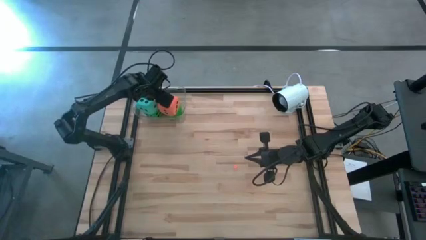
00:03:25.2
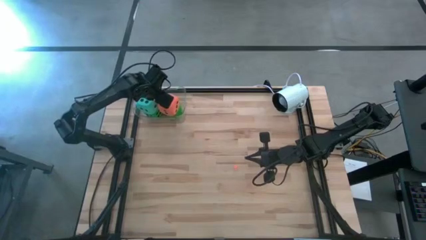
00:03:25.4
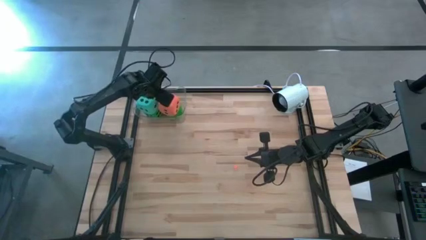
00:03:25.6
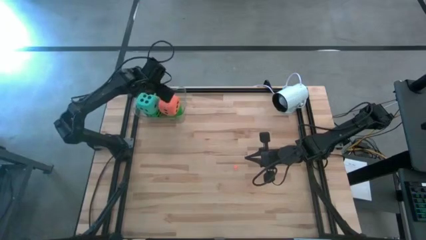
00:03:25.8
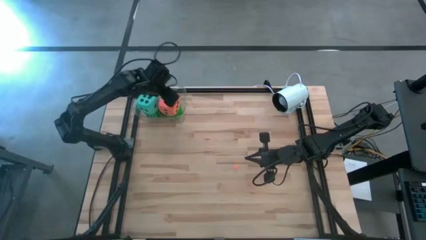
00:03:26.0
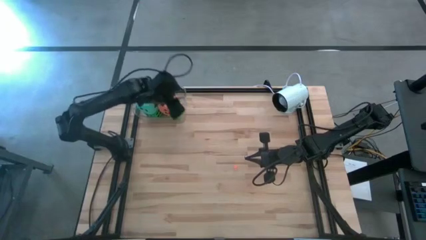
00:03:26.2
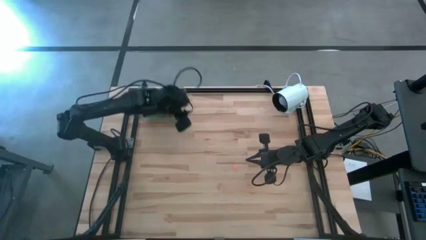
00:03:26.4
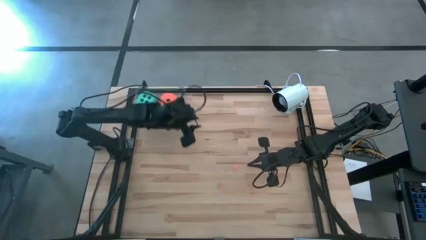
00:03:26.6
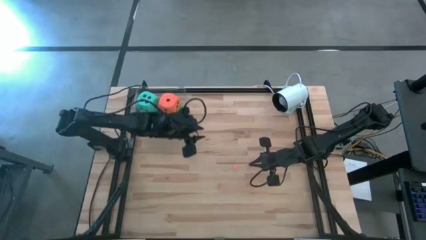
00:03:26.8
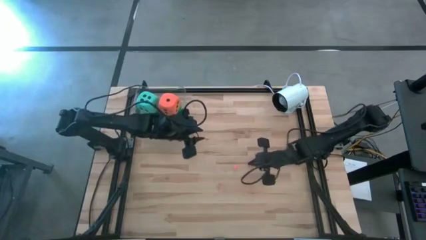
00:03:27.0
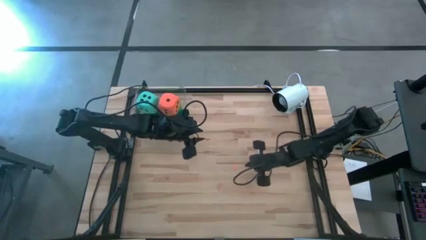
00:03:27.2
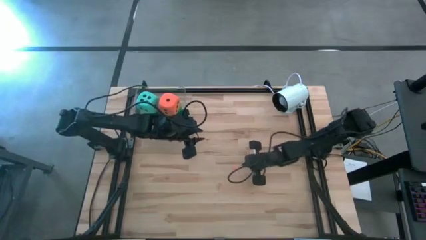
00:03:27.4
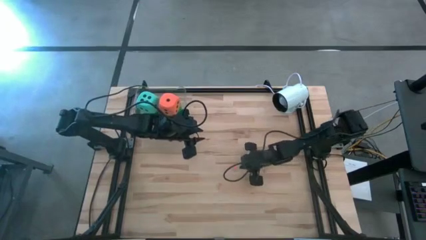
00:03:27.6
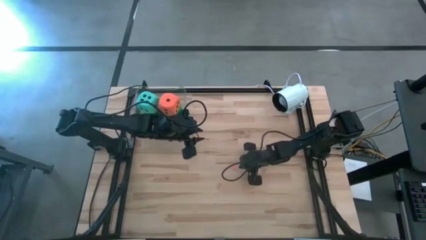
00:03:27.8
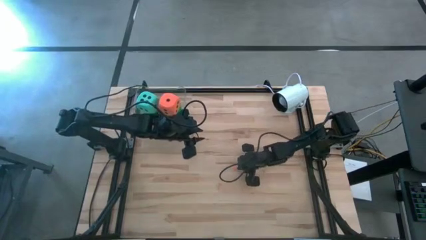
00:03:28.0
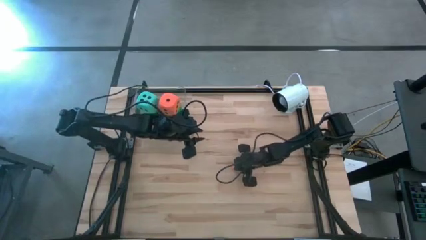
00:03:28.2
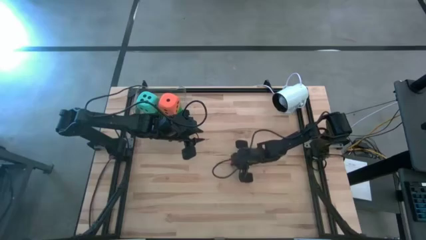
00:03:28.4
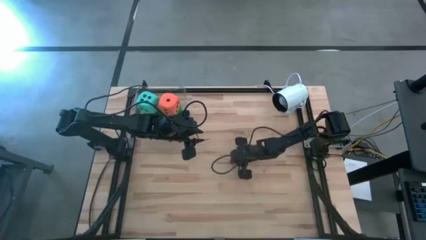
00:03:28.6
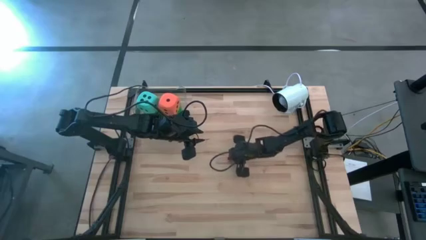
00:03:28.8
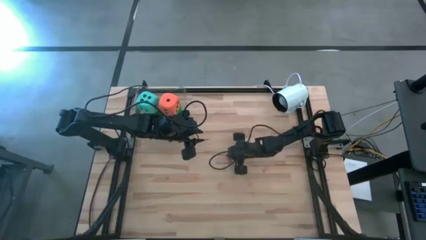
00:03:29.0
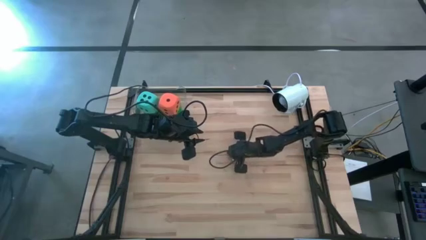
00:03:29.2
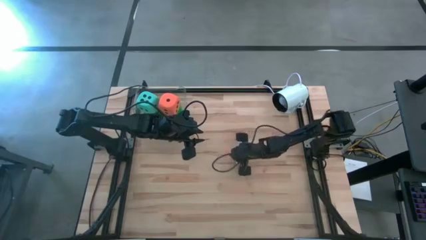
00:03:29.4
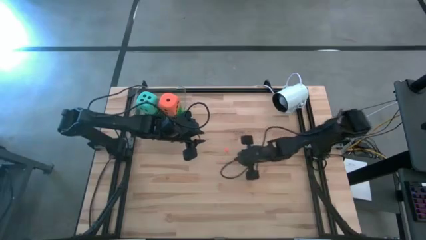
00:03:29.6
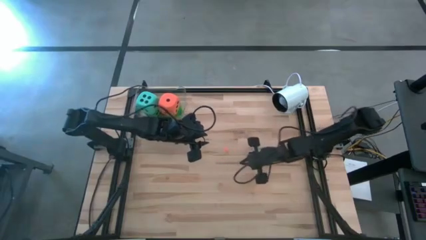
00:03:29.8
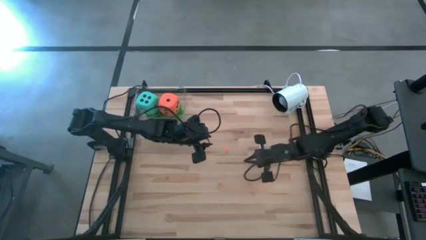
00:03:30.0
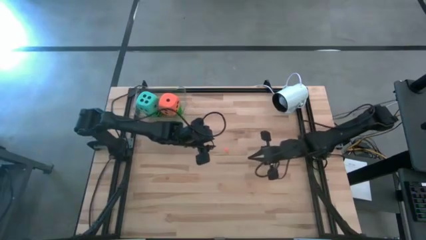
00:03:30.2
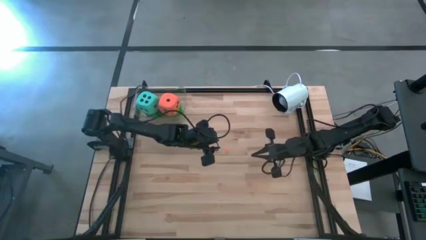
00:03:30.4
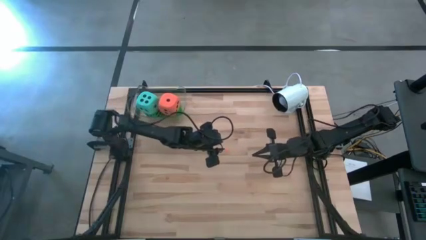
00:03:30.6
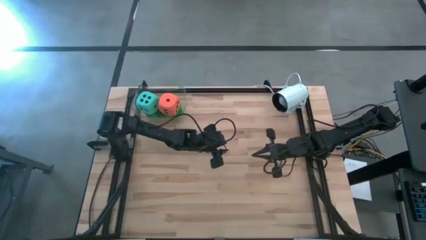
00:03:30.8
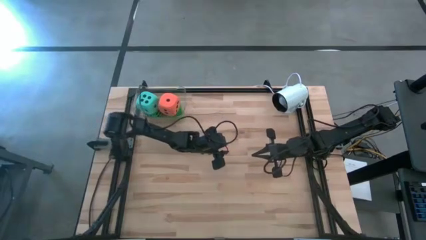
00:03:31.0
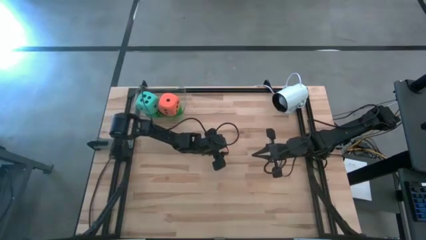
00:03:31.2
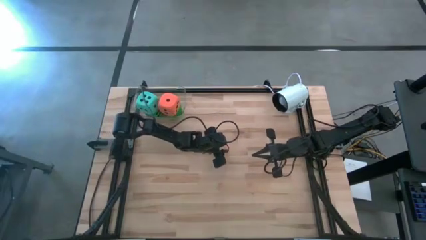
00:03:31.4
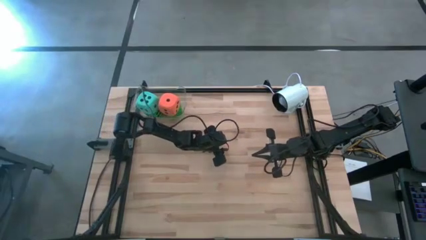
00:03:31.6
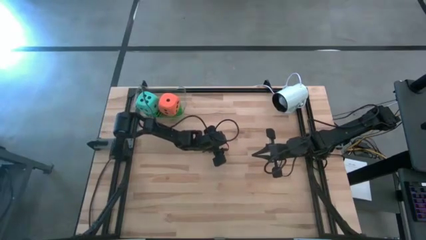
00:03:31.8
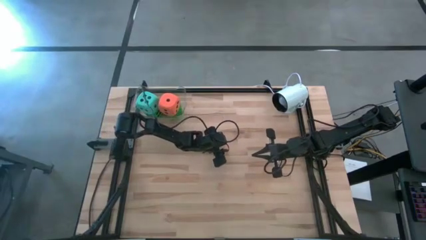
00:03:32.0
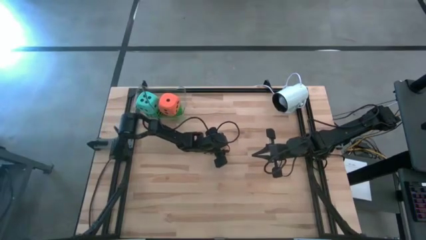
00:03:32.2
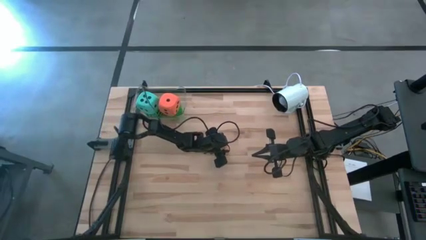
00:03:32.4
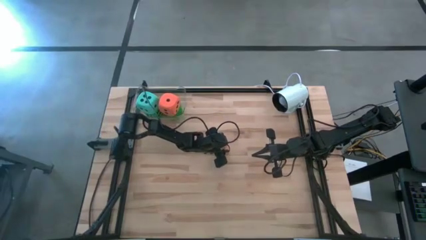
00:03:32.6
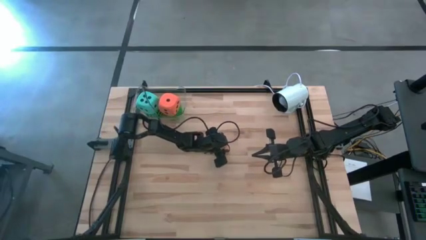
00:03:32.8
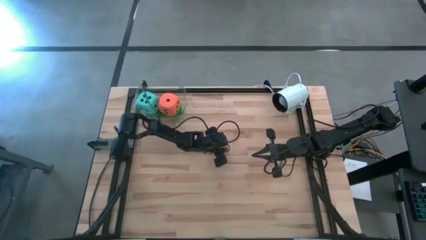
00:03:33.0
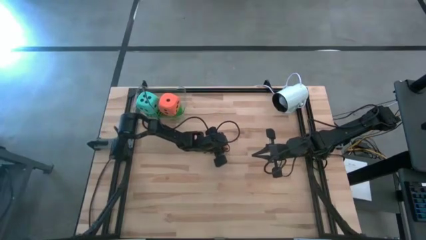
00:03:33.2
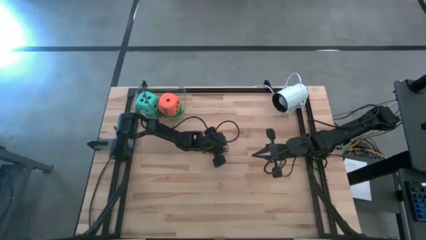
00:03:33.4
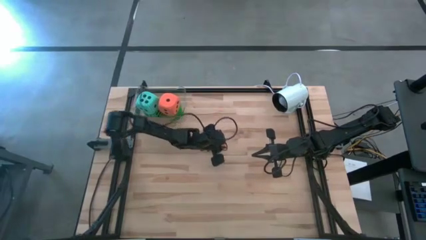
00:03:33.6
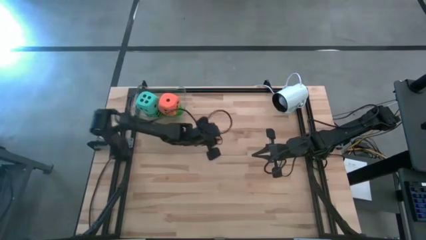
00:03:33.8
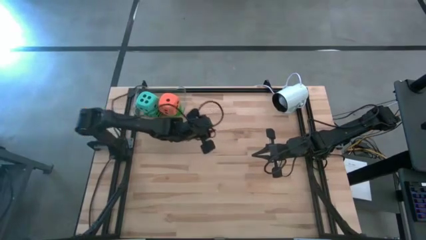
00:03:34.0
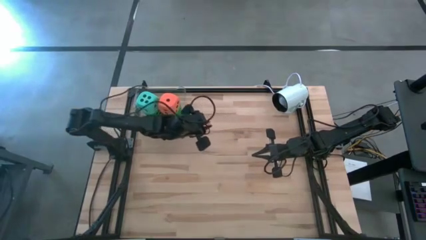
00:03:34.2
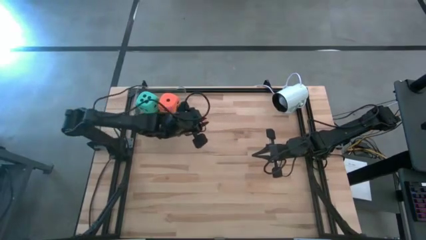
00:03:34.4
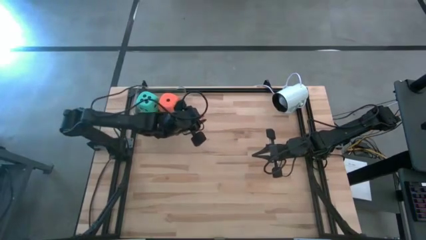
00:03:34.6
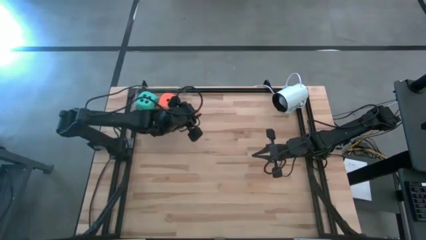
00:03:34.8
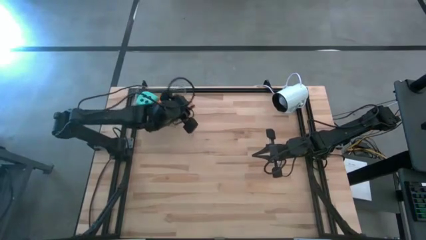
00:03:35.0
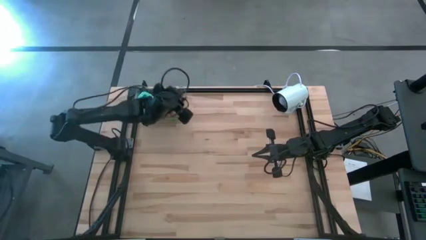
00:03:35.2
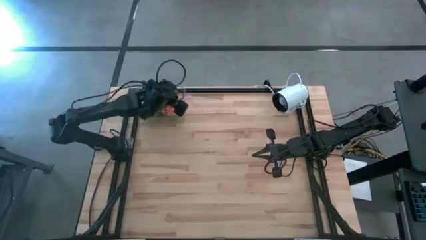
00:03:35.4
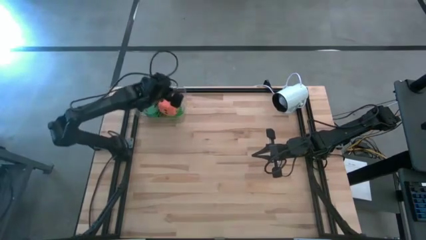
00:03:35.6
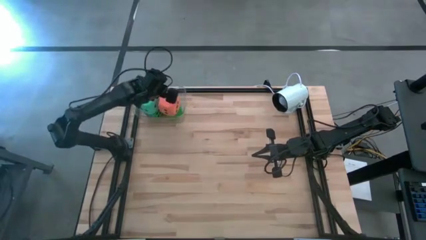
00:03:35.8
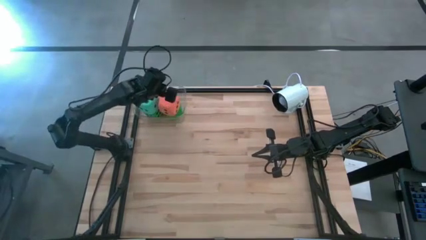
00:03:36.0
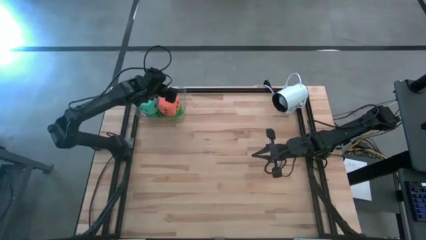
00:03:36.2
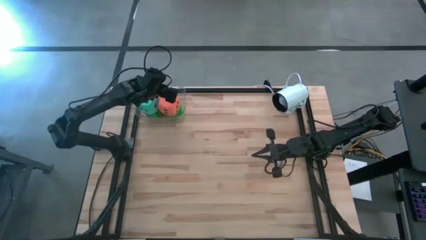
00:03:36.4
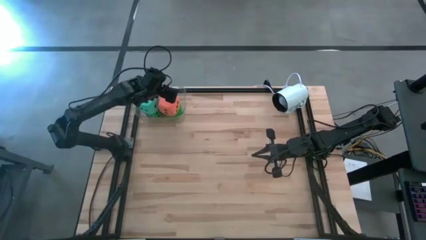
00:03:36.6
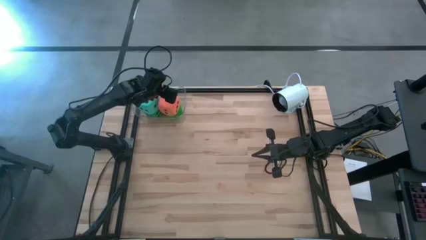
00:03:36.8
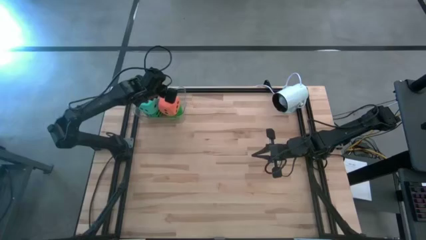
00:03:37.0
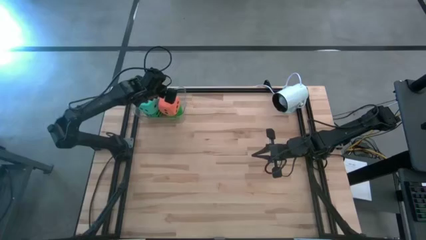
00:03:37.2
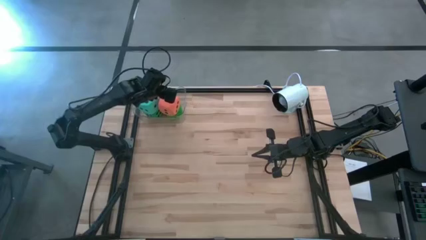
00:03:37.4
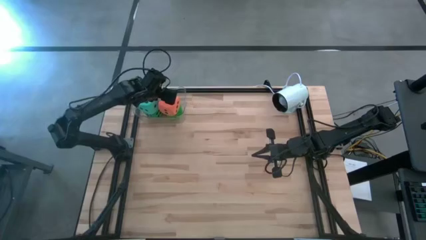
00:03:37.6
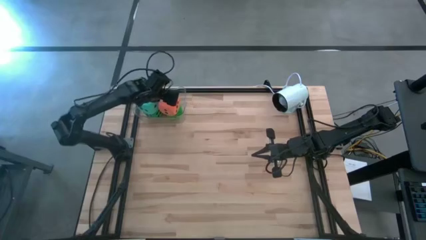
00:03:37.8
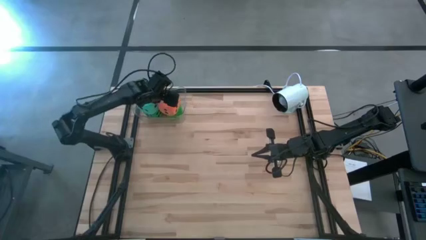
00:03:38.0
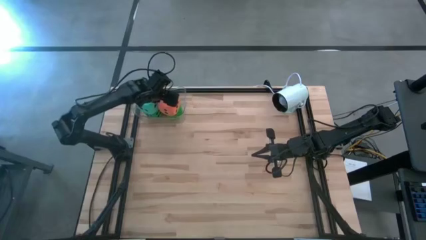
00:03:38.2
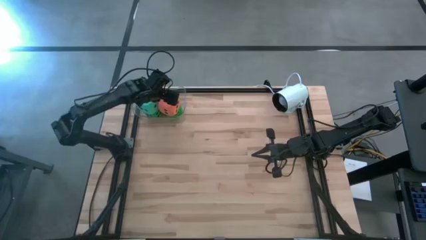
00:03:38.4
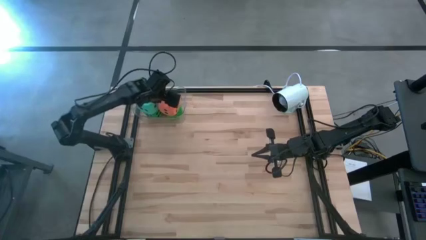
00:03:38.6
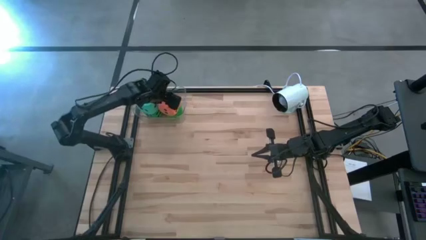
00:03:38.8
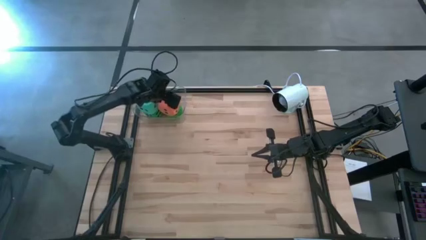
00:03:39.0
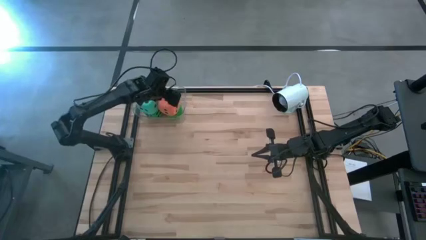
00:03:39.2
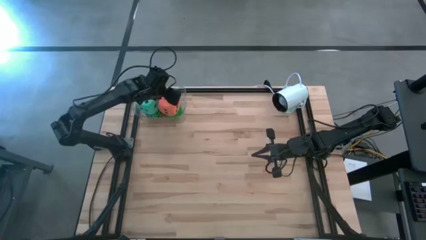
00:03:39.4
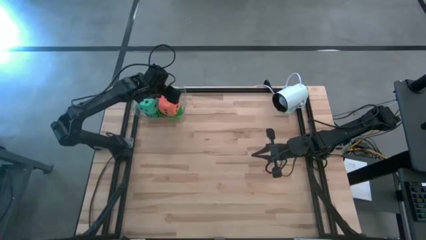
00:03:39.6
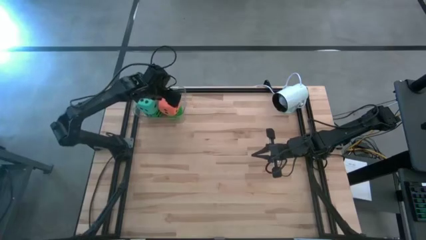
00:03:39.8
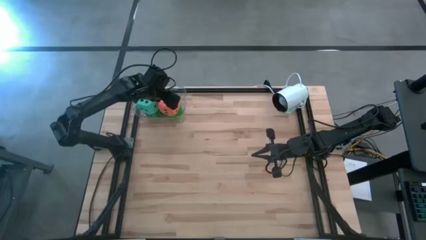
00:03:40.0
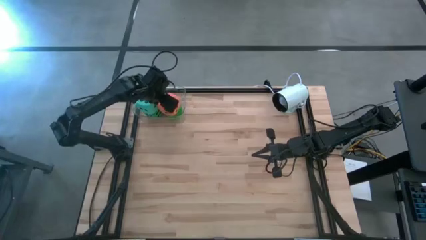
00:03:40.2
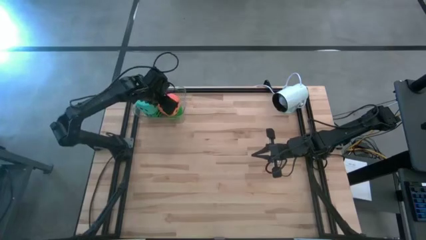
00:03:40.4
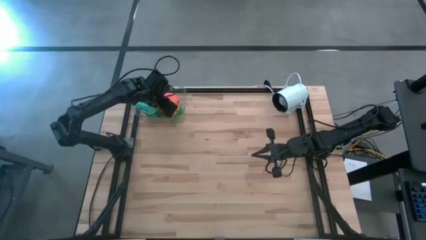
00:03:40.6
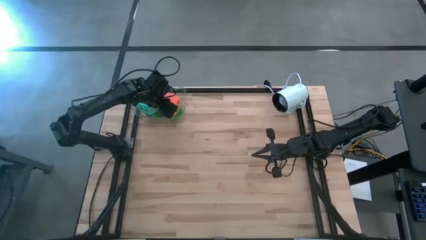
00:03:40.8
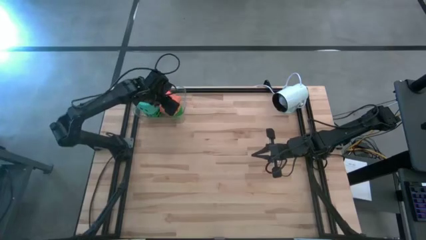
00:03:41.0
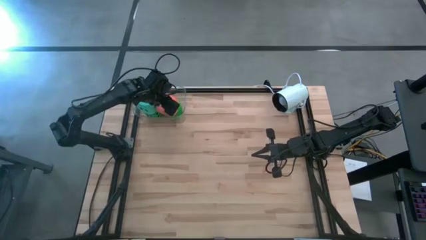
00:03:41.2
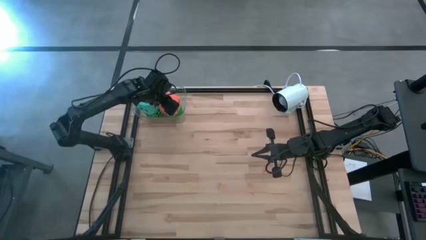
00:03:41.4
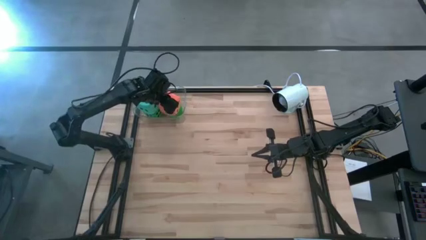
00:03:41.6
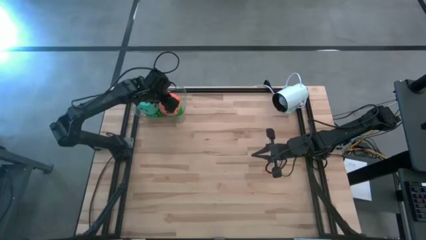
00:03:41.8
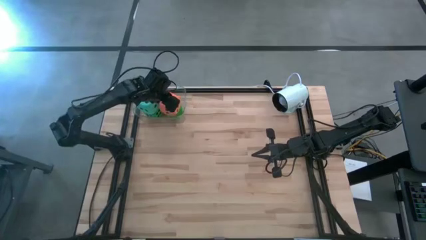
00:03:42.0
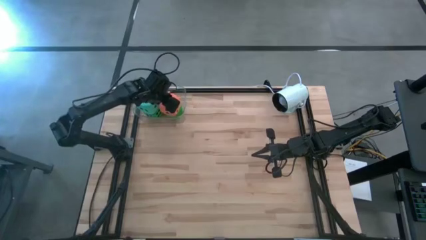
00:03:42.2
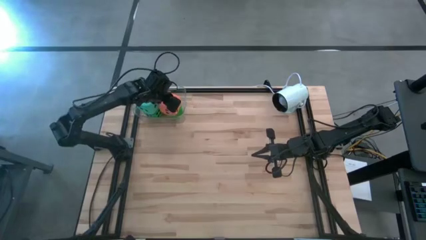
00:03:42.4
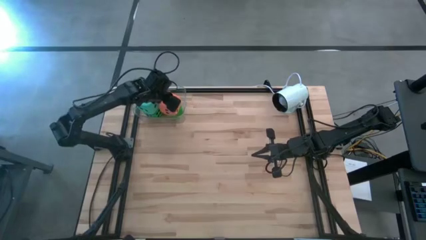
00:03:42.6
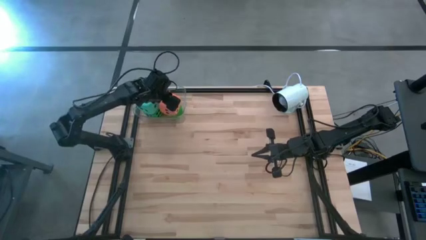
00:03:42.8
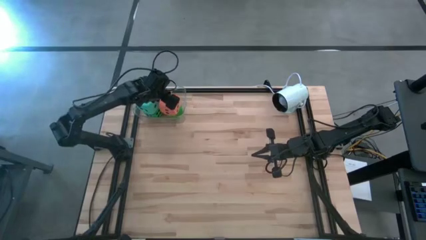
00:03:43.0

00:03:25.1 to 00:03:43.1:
Task: Pick & Place Dice
Put the small orange die into the transparent bin
